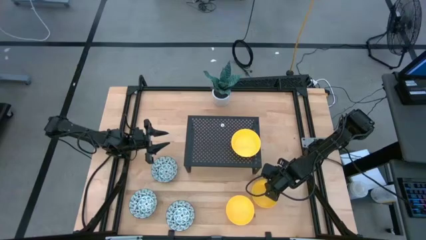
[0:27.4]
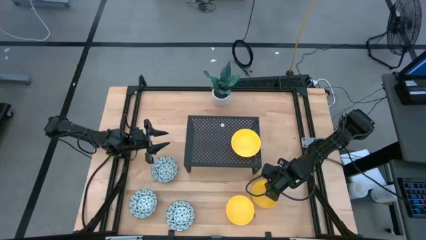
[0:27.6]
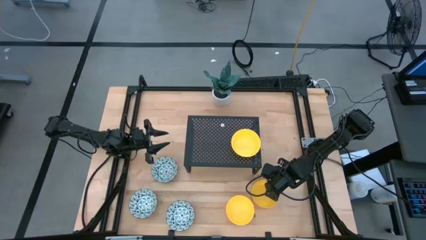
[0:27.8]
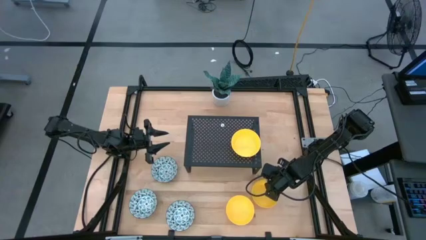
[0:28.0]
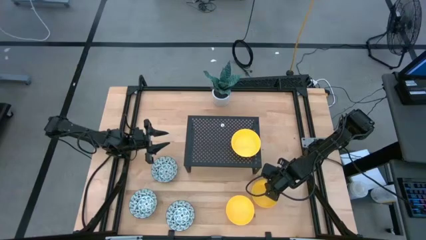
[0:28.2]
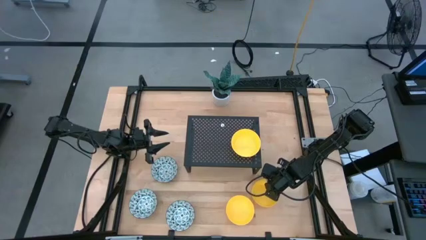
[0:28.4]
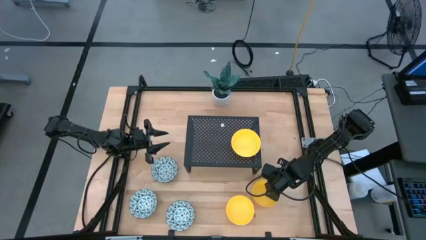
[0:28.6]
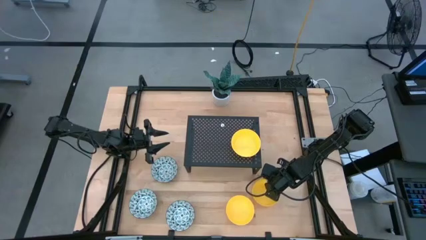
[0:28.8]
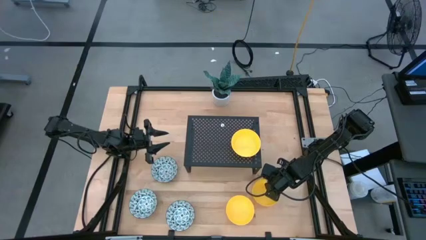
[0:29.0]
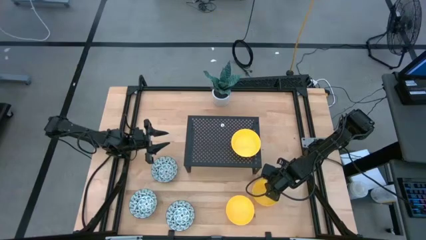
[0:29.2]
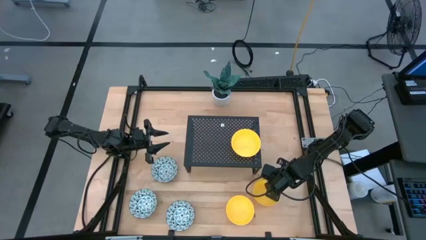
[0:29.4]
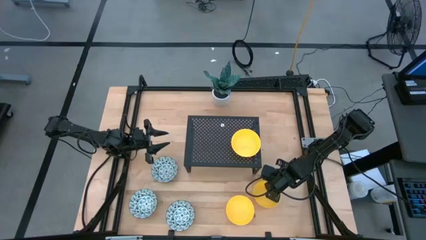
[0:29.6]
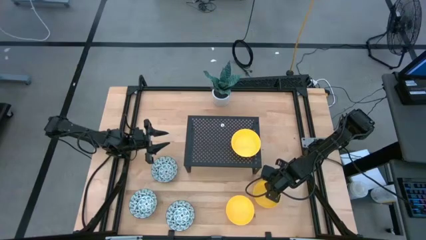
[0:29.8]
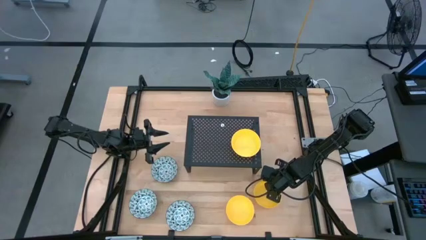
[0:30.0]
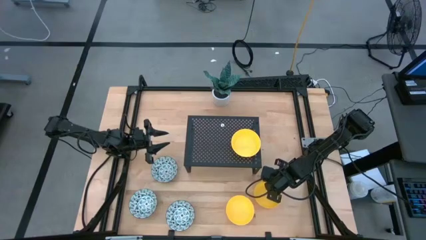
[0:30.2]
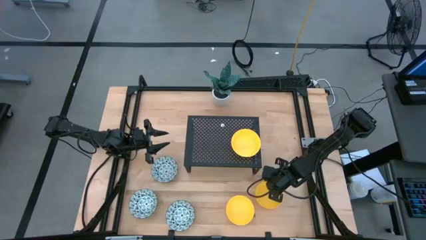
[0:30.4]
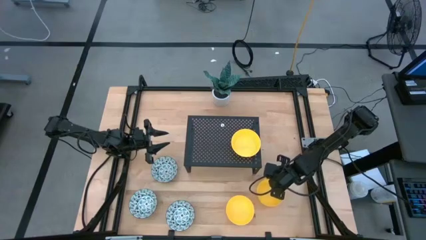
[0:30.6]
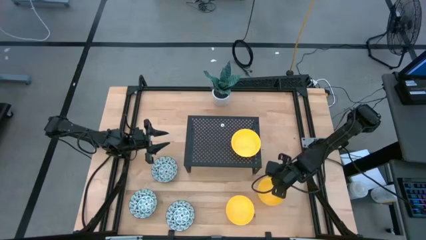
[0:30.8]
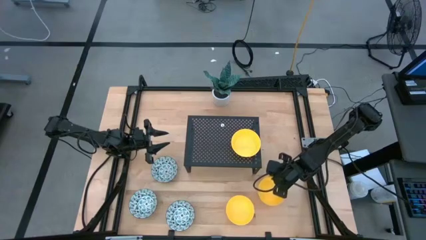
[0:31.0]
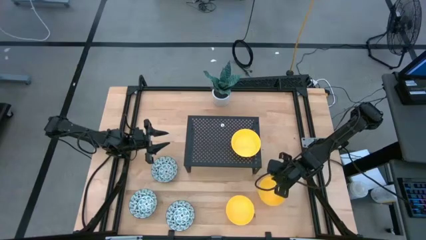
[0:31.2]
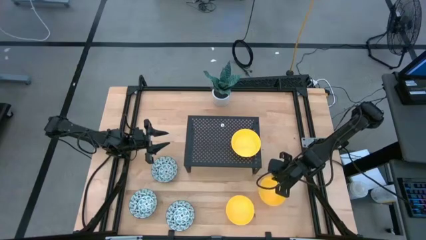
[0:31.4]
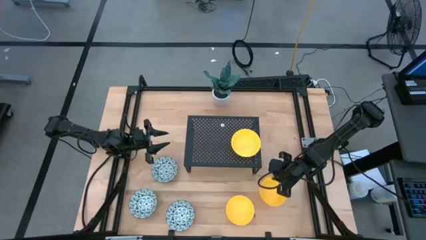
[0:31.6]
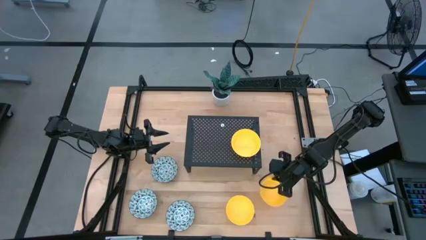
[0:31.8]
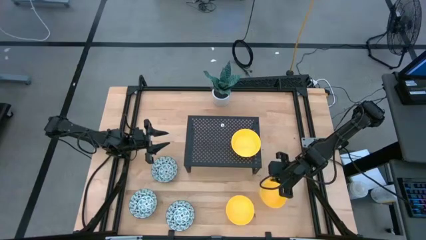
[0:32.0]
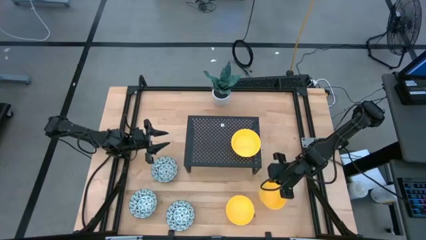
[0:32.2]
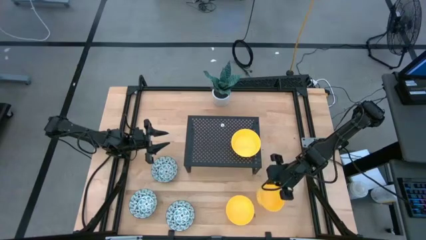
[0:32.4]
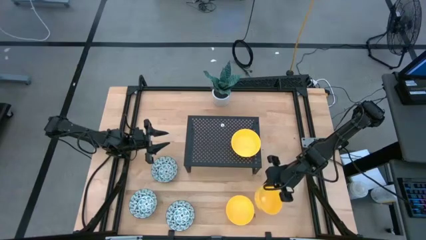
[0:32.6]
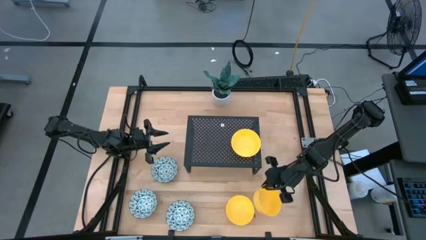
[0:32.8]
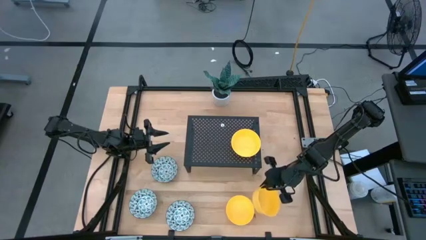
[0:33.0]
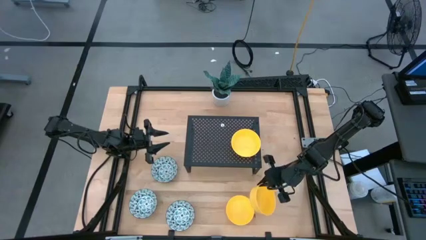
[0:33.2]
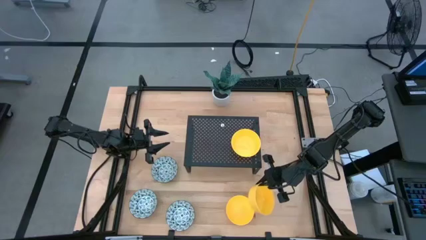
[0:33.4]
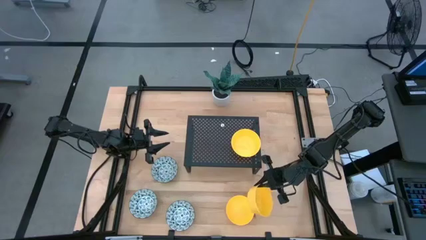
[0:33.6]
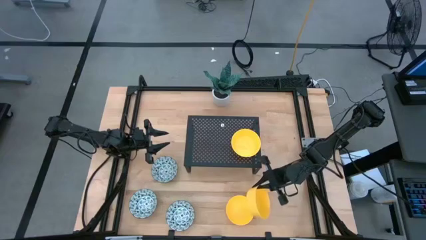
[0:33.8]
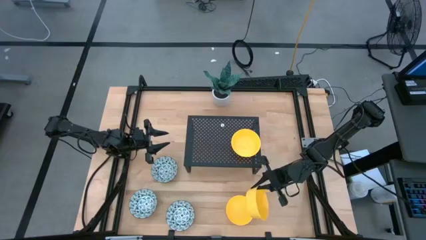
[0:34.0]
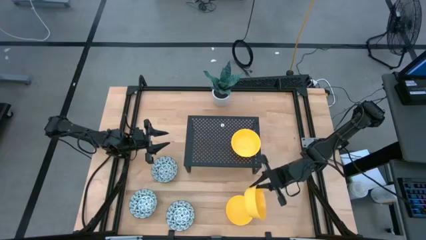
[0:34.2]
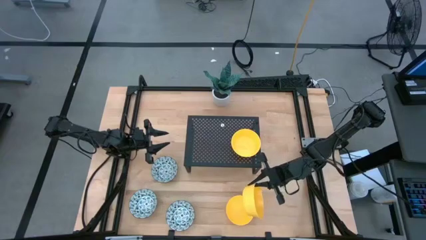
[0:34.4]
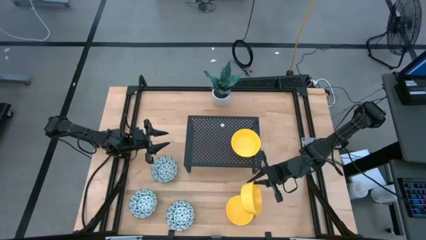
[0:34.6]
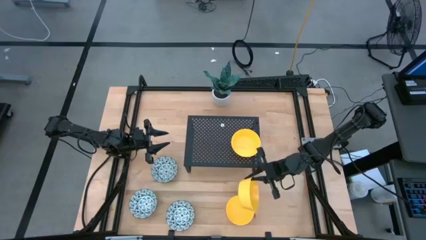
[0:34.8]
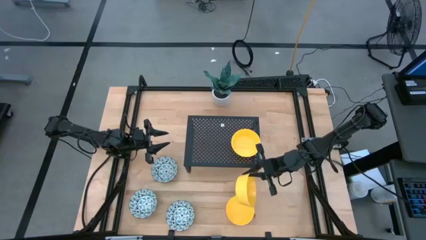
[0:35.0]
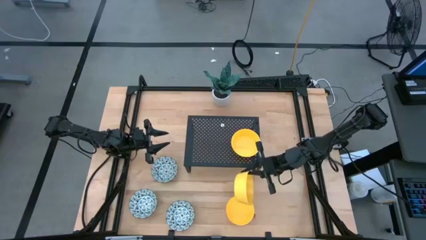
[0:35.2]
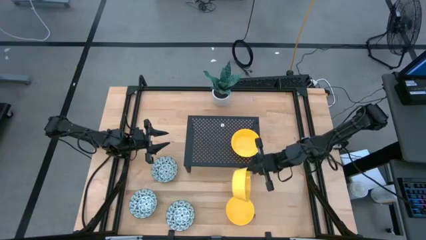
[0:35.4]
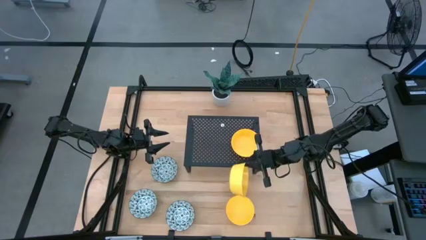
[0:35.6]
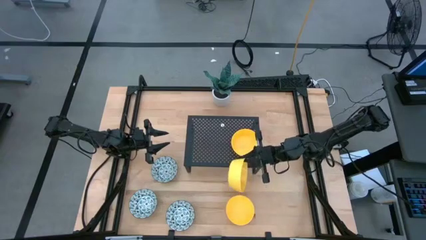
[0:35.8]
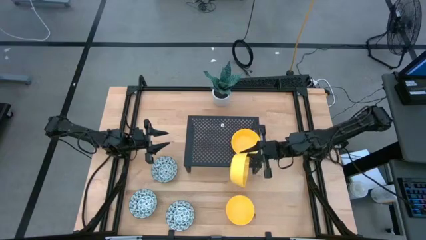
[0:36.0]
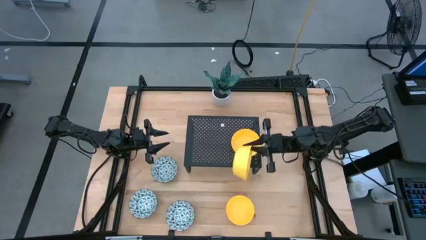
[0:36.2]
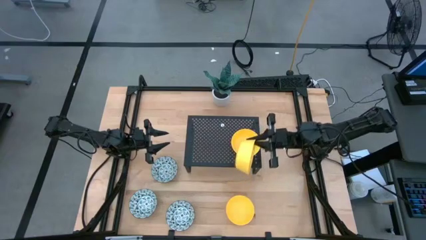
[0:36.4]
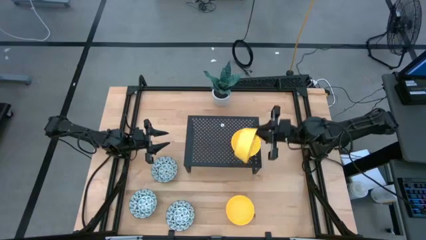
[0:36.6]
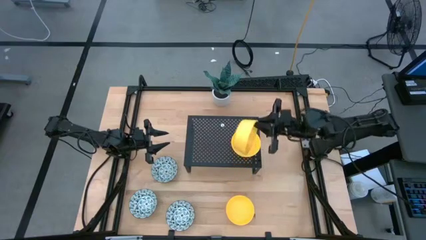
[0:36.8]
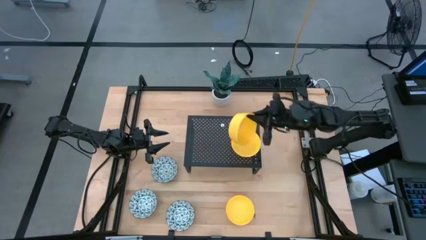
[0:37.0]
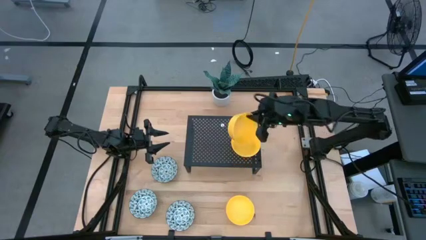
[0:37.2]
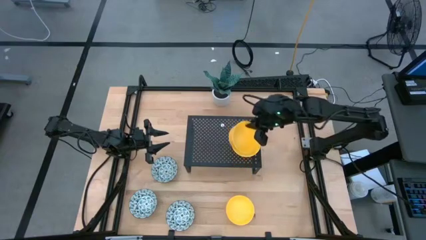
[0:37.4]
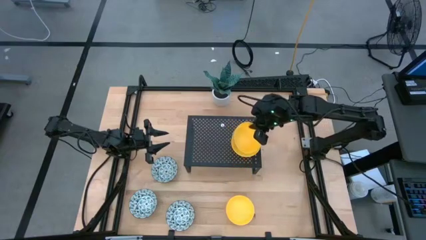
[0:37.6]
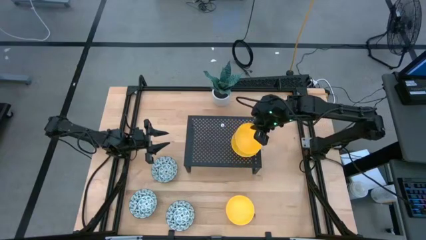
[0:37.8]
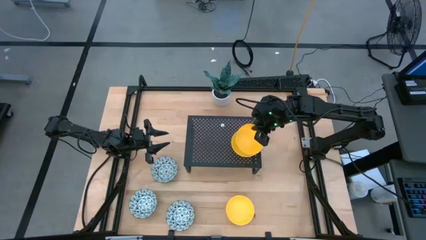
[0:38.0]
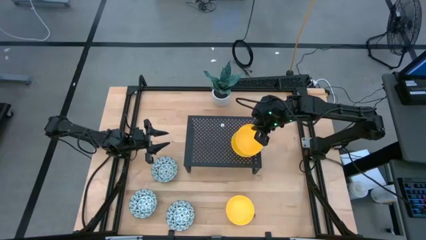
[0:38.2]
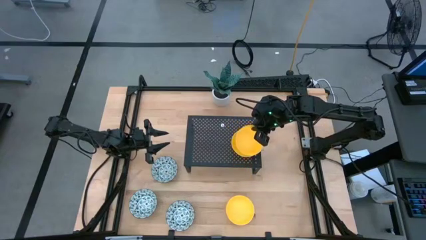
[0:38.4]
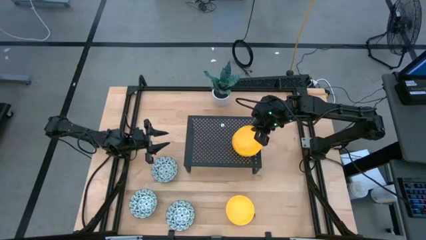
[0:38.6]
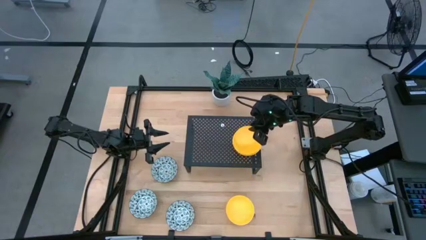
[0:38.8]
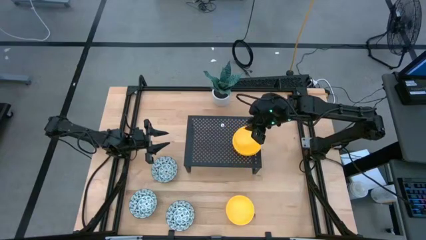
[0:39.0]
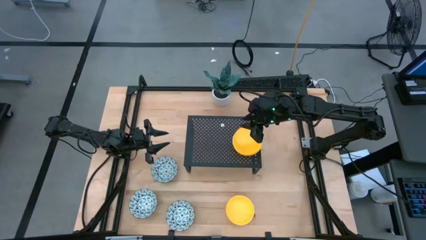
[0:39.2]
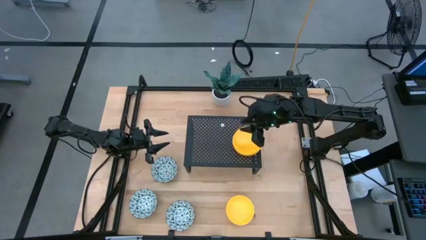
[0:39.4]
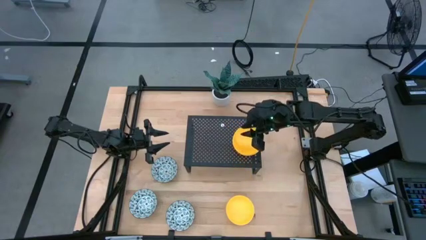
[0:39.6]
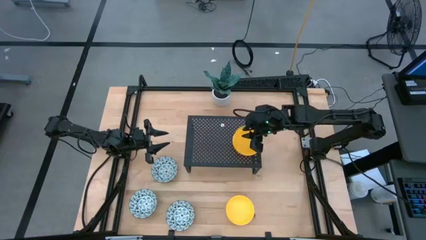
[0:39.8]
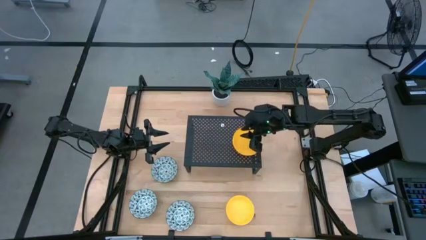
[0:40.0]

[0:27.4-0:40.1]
Task: Pick & Place Mini bowls
Stack the right yellow bowl on the yellow bowl on the shelf

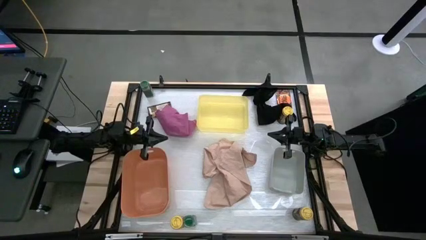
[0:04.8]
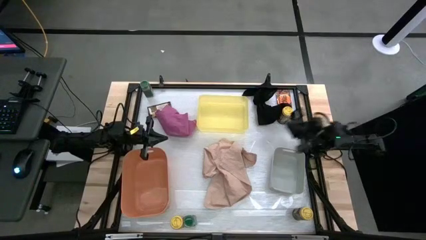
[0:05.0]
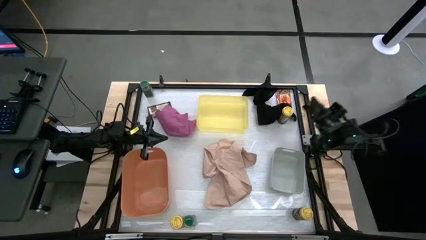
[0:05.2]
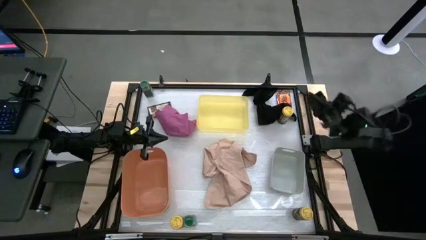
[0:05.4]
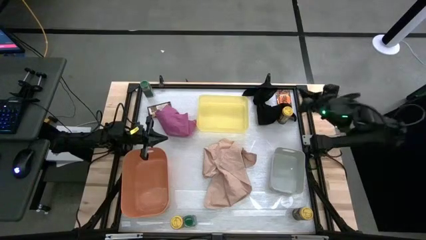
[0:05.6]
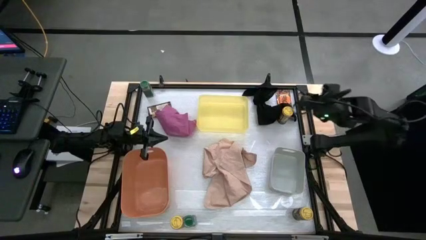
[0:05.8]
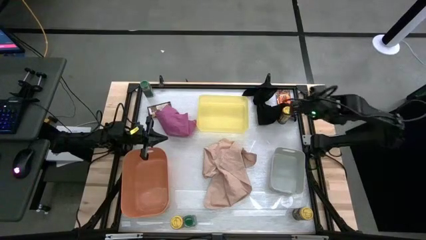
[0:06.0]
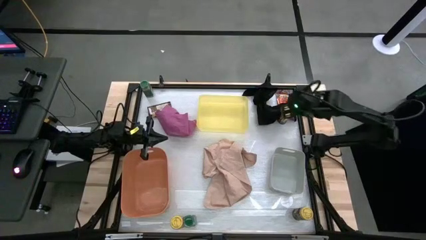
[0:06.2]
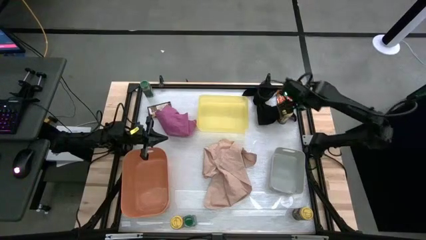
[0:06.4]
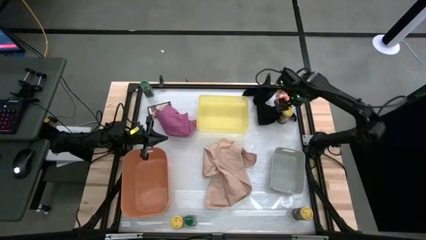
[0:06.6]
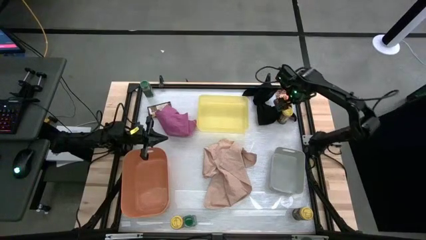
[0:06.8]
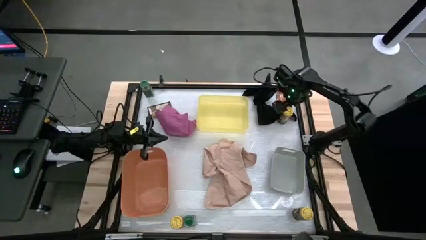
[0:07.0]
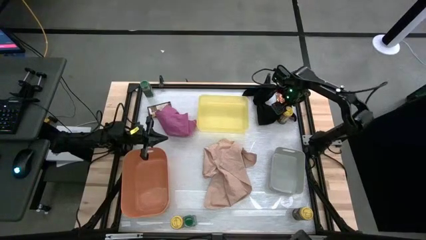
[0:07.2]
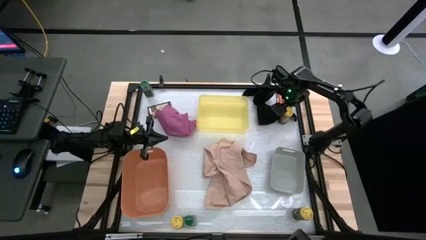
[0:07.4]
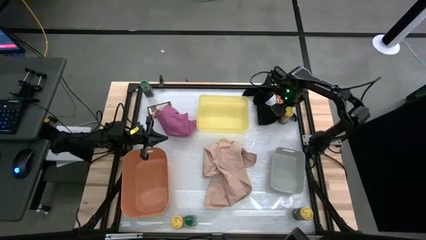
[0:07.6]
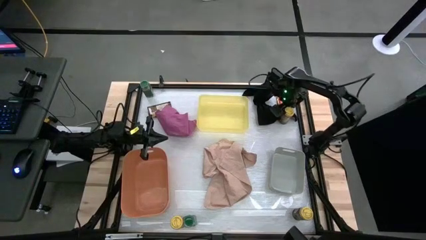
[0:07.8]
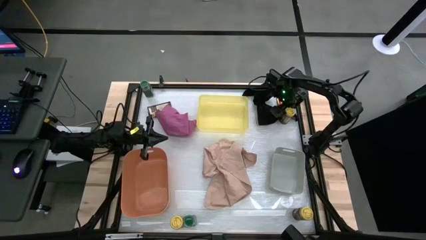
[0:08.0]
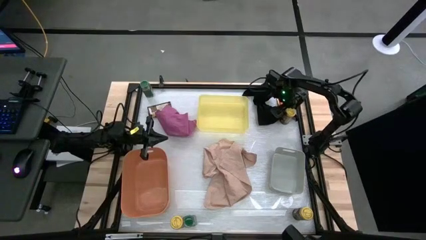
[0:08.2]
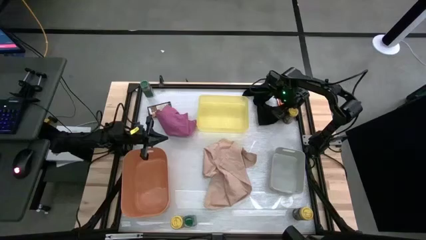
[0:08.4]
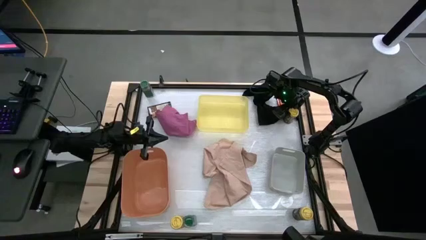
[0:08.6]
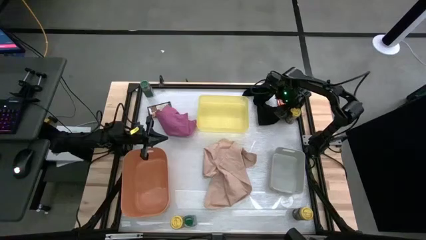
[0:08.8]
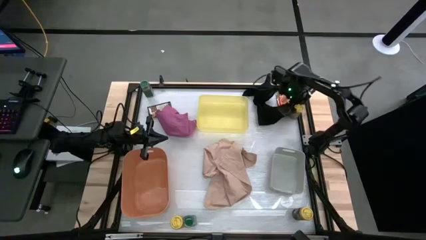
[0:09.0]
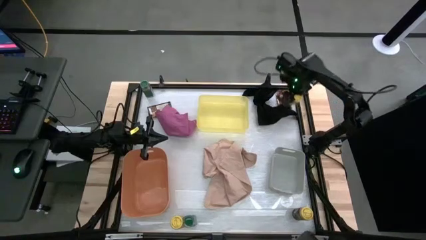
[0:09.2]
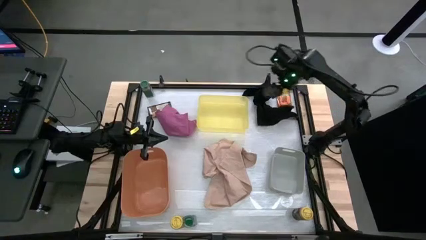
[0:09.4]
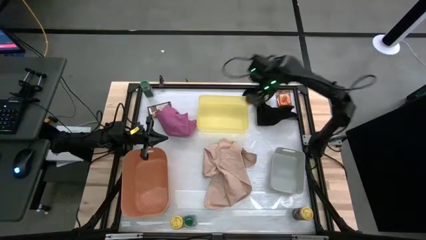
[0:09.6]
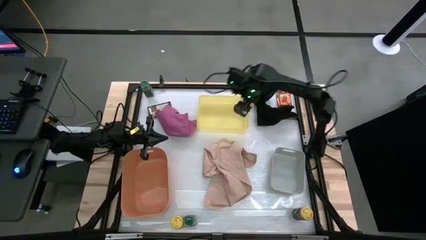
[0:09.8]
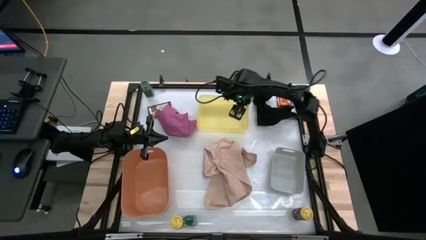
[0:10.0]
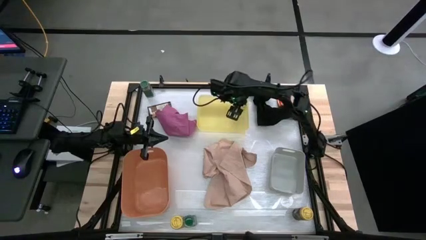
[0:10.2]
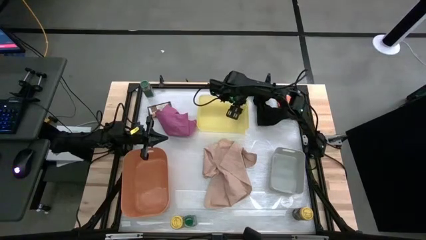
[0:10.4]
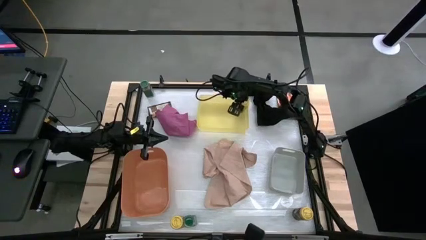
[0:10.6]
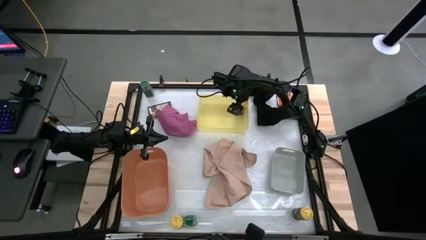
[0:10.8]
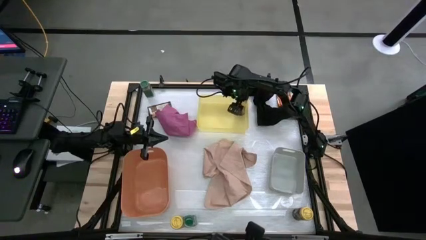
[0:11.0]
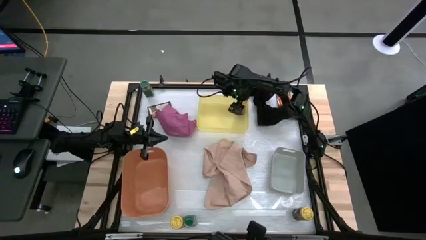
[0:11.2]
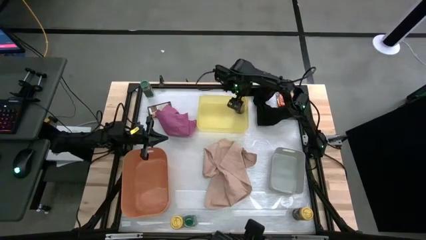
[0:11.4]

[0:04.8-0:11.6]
Task: Sort spices by type
Put the top yellow seasoning bottle into the yellow bin
